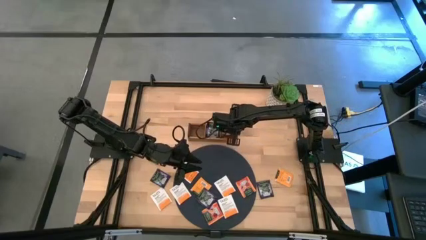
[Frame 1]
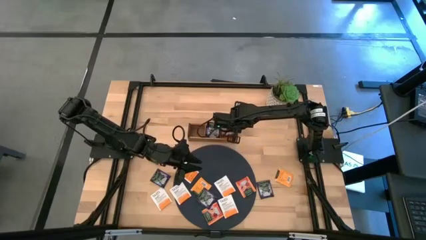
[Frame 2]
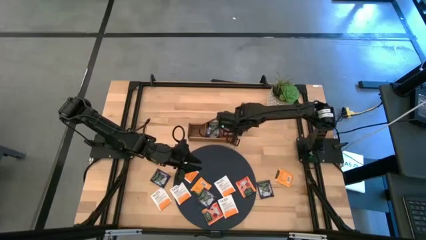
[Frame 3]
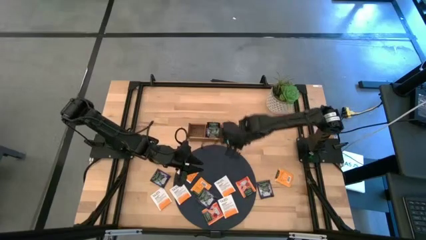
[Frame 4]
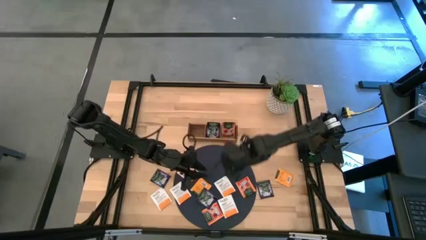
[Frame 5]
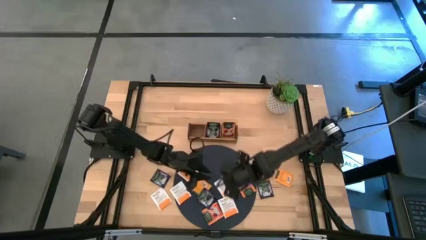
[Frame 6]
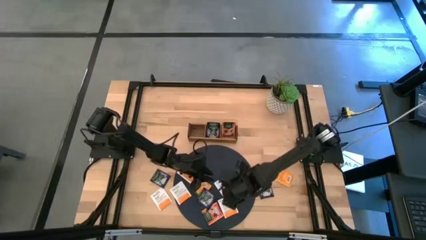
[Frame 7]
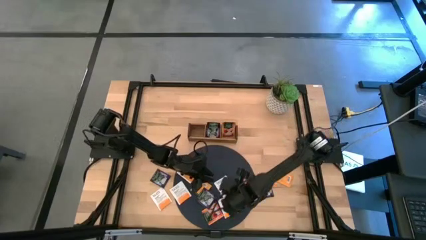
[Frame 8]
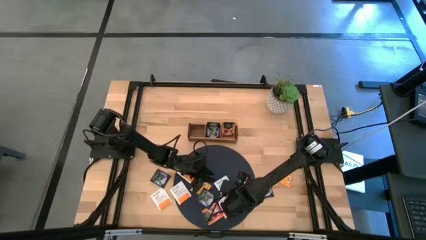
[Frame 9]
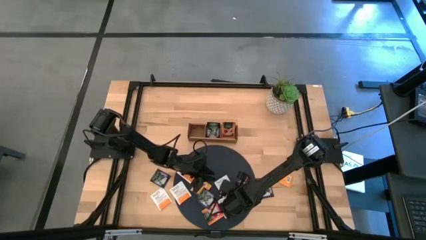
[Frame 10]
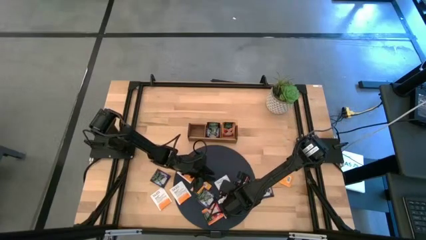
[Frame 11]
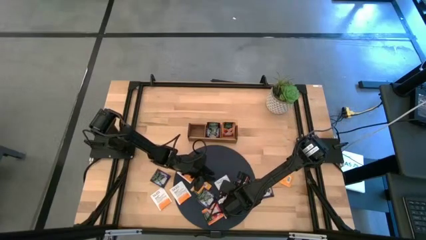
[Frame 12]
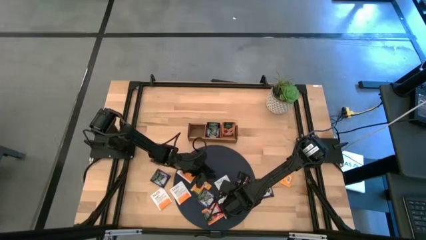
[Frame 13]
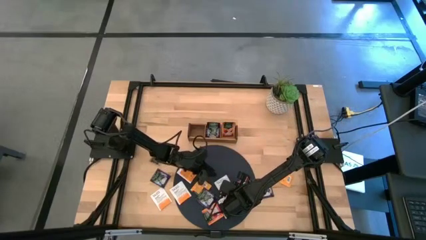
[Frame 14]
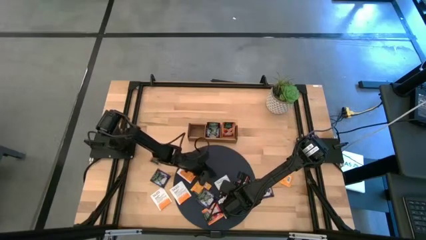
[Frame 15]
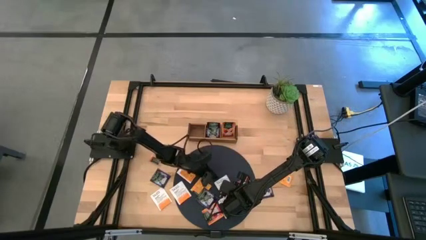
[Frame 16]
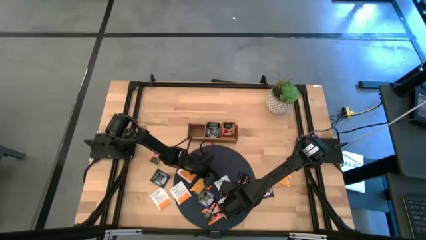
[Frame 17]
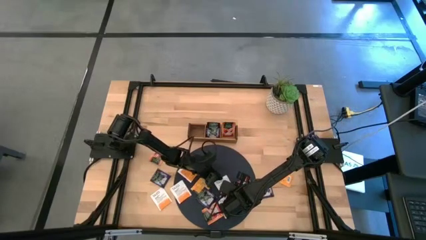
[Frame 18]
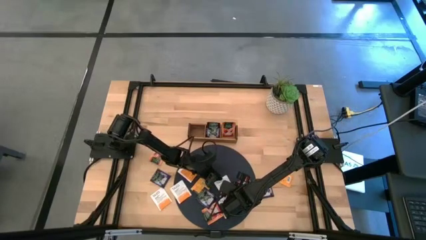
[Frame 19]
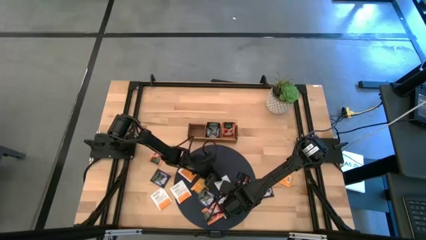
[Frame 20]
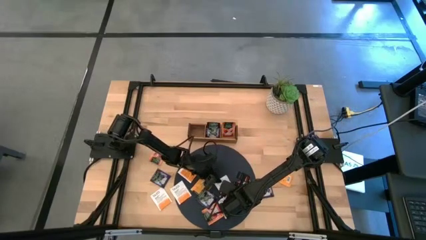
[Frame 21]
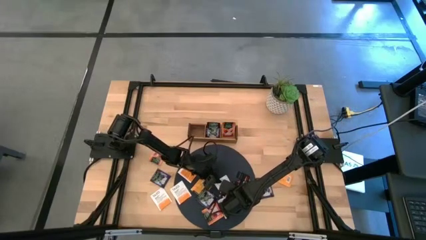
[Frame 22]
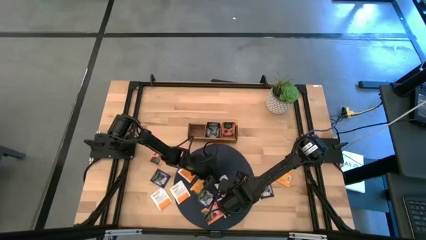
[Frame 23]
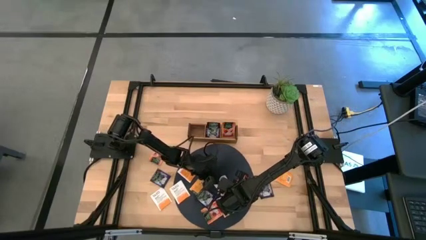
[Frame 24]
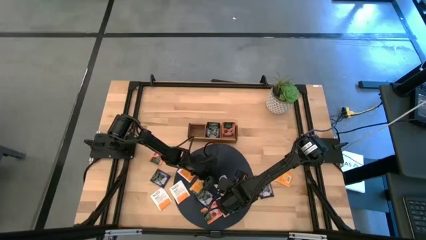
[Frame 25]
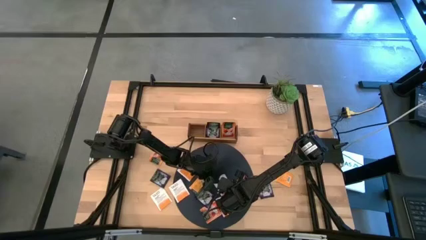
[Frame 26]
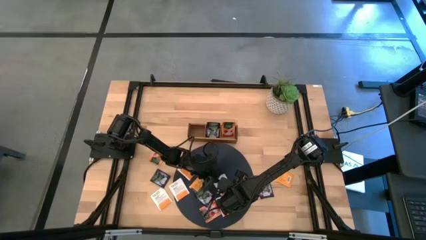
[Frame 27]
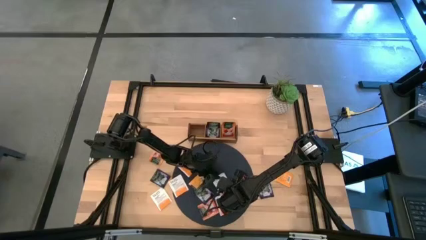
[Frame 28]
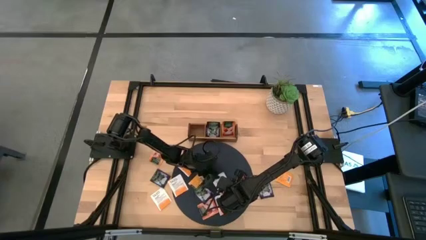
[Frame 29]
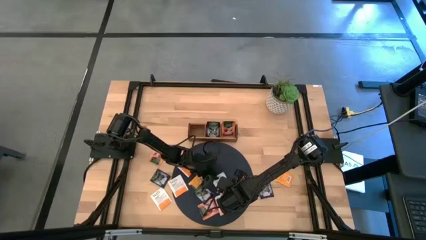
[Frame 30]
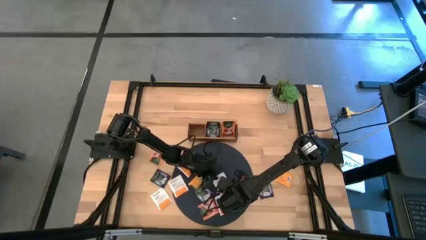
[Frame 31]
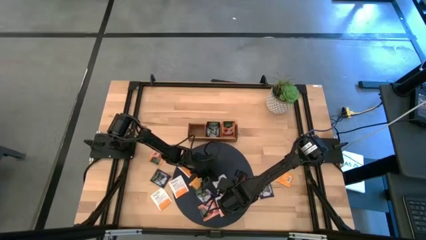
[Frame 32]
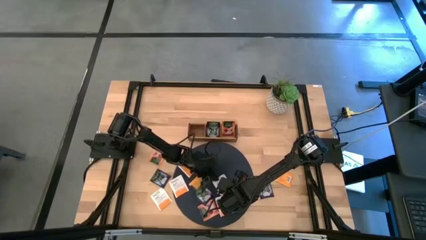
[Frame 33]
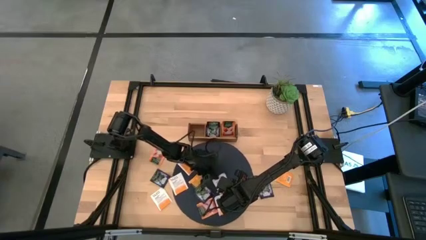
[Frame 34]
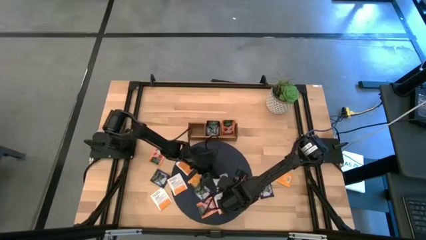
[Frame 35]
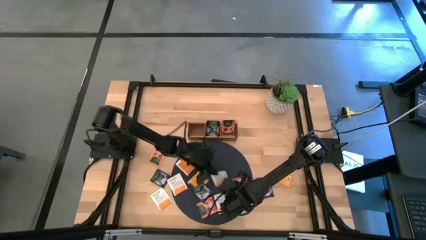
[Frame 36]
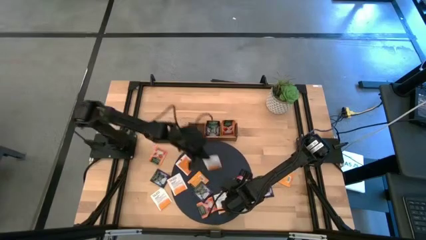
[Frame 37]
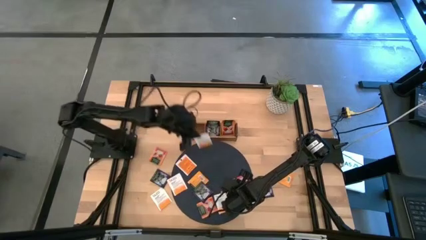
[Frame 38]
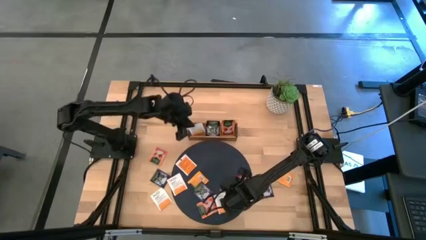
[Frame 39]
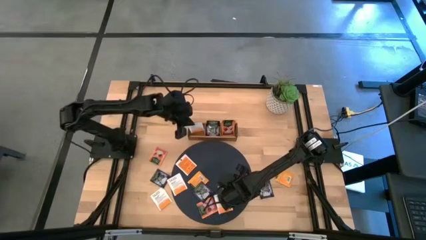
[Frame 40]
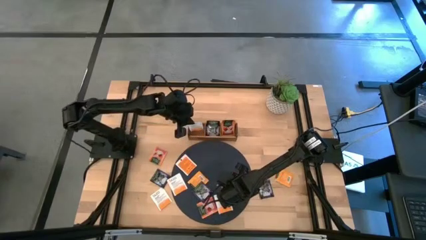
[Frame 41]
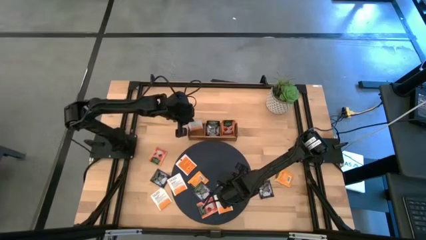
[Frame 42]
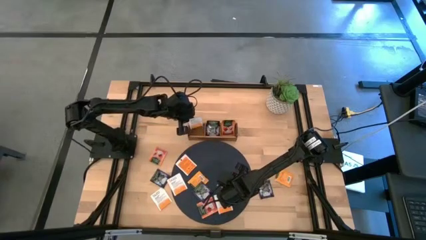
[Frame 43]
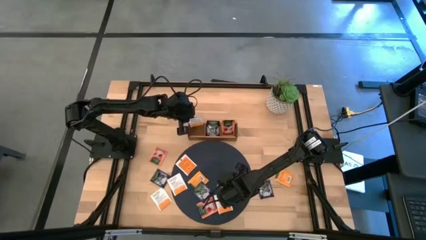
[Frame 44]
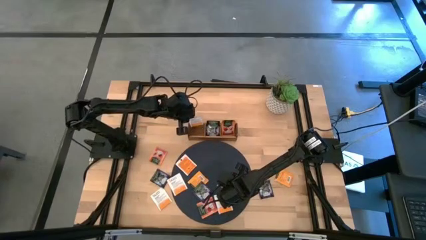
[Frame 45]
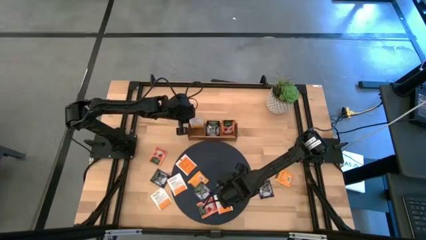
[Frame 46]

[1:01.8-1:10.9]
Task: Pick & Place Tea
Put the white tea bag into the left of the wooden organizer

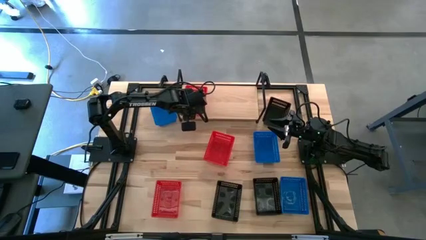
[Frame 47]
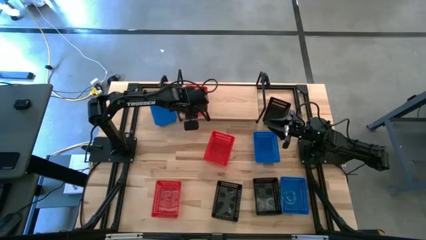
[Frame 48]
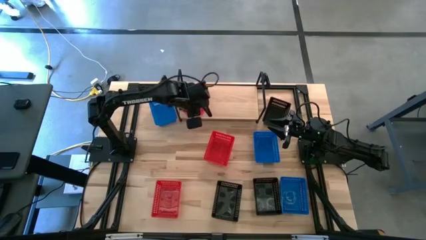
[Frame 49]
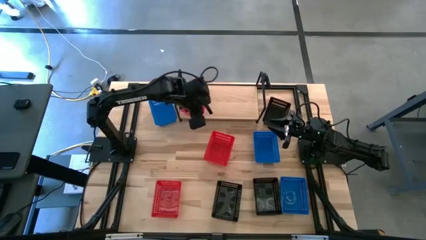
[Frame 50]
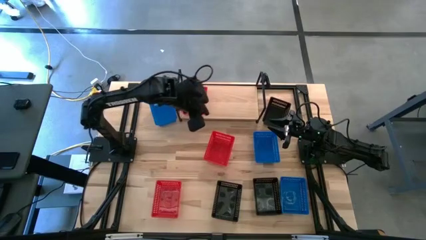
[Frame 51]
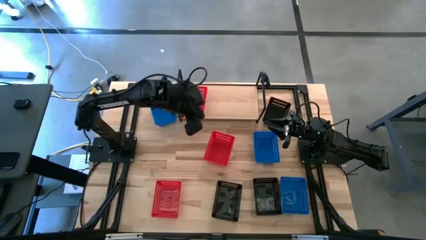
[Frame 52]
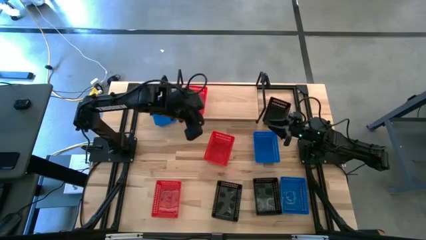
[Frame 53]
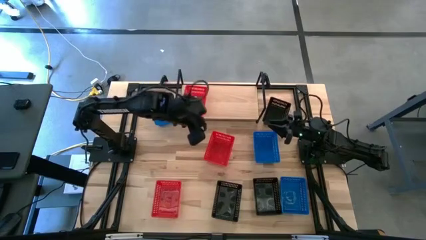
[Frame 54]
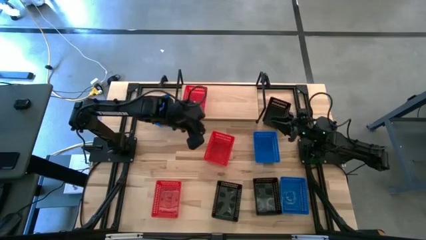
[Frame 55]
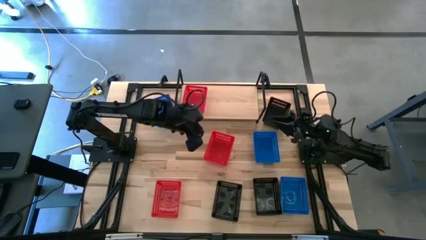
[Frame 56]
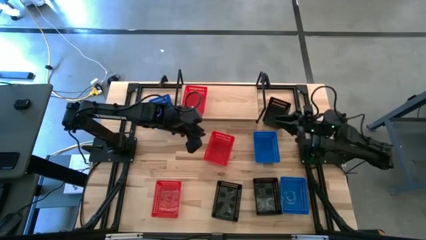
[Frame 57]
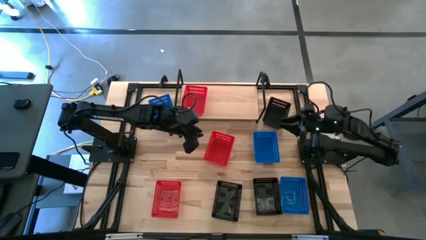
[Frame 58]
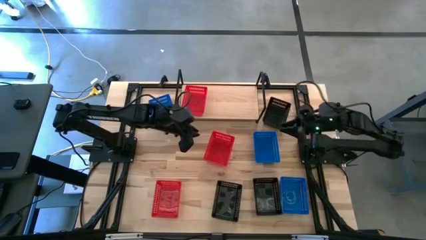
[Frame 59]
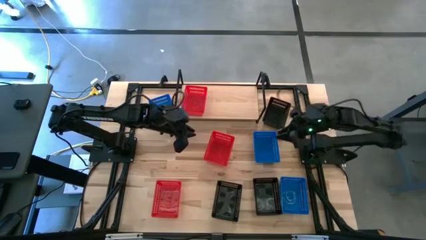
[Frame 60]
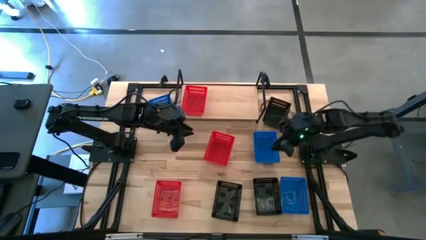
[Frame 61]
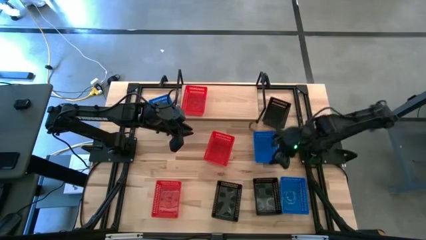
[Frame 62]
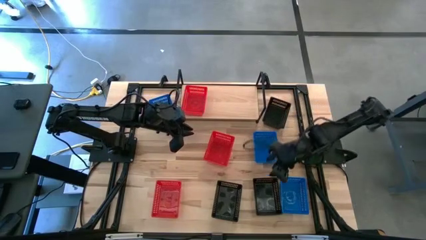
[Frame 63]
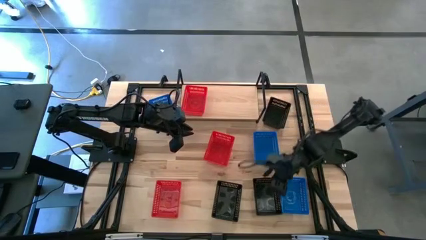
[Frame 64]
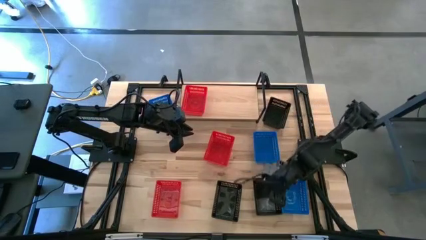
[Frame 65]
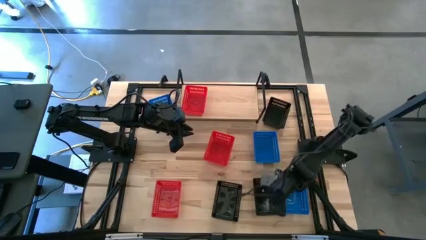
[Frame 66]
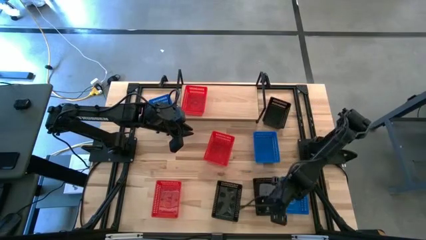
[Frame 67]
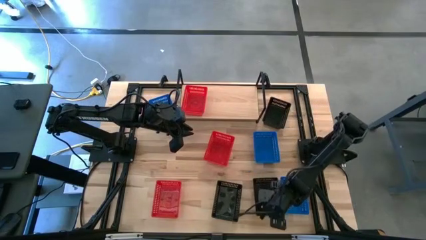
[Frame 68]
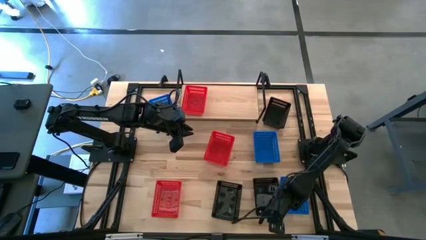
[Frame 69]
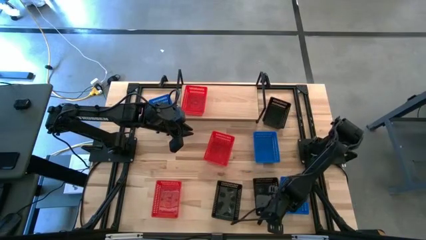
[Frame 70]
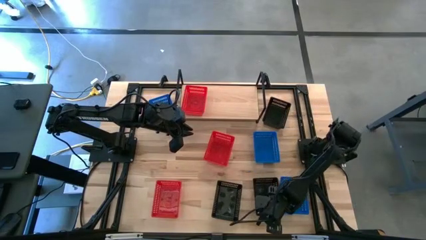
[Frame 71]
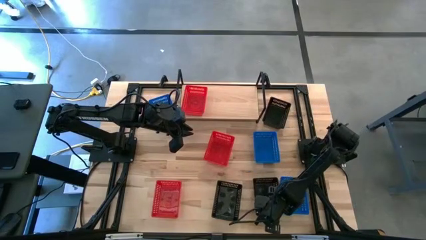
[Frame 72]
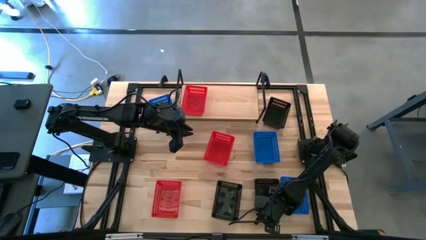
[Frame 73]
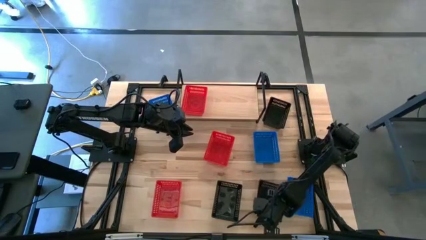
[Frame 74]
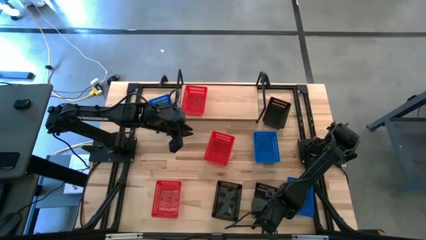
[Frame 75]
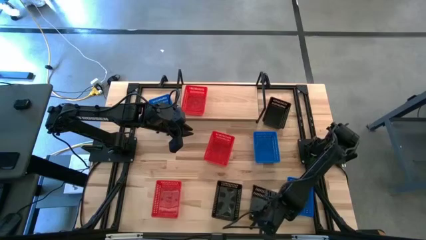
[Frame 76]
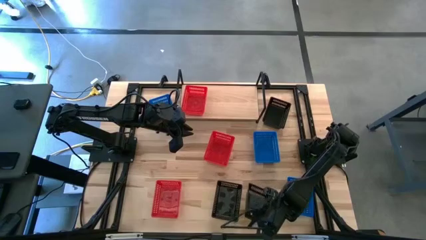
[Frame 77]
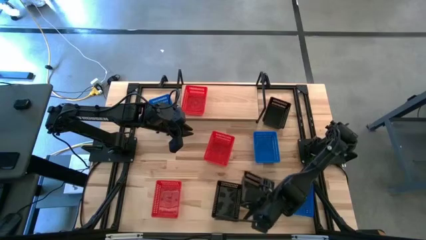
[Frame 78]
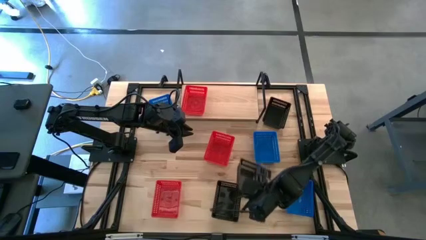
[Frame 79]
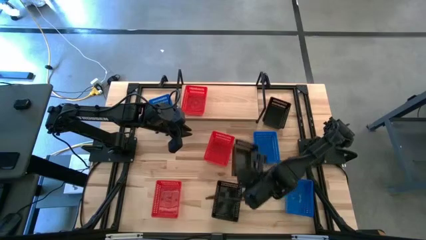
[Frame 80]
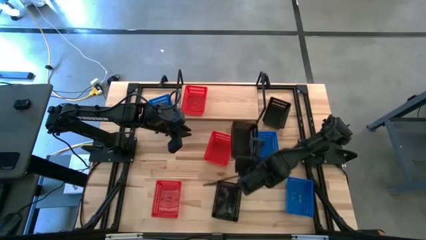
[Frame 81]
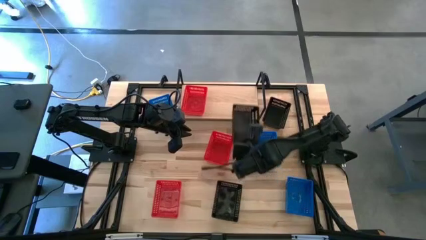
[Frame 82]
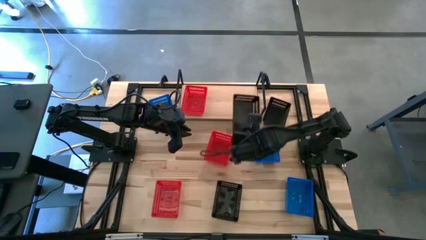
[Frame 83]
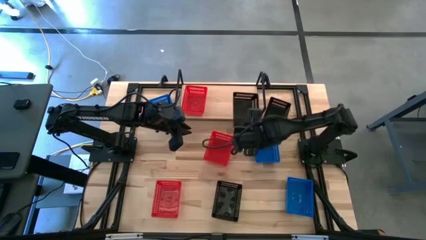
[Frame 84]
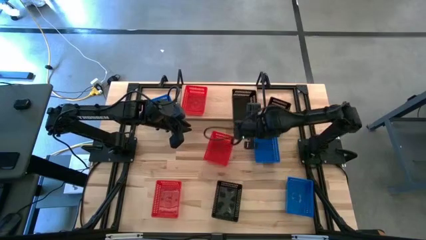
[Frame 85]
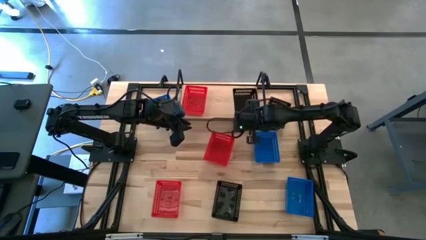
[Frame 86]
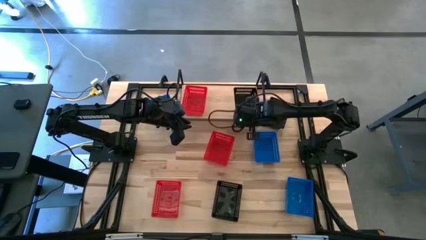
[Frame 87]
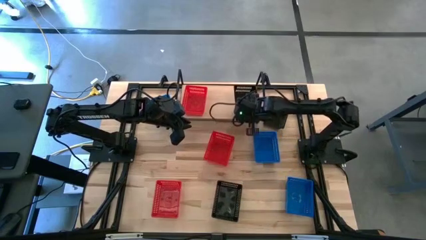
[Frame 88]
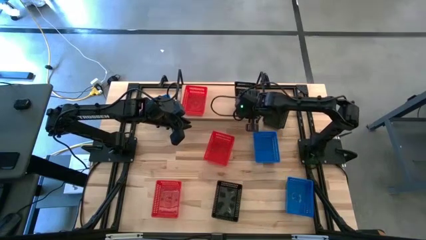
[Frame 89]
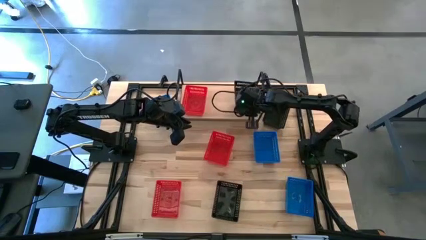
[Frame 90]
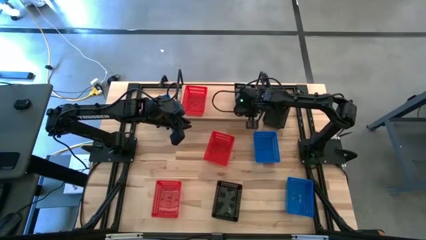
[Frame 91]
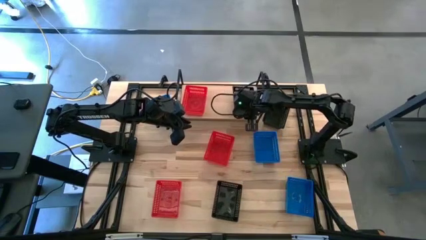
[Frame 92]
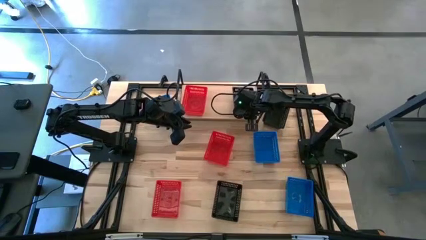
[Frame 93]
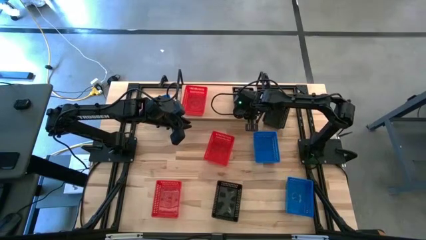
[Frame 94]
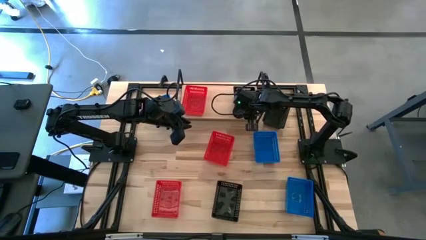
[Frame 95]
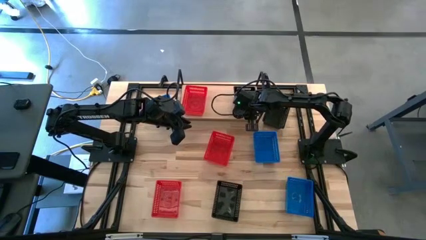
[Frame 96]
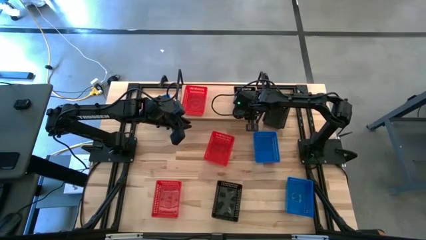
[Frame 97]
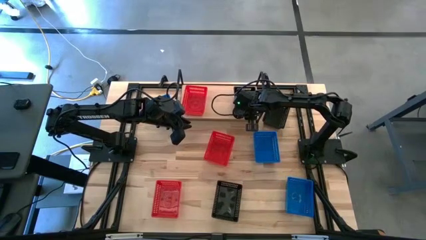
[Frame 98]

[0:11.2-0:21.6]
Task: Stack baskets on shelf by color
Put the bottom right black bin on the shelf
